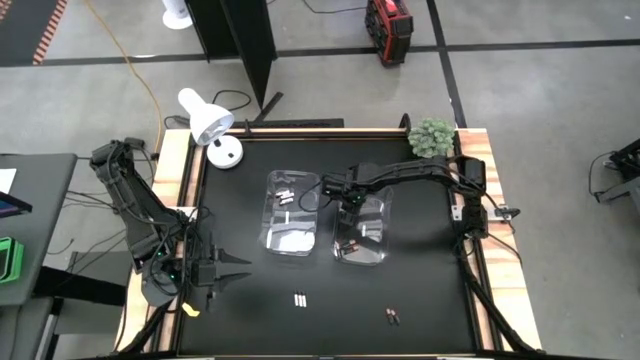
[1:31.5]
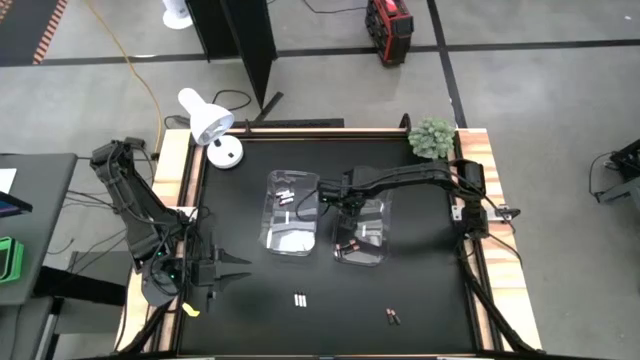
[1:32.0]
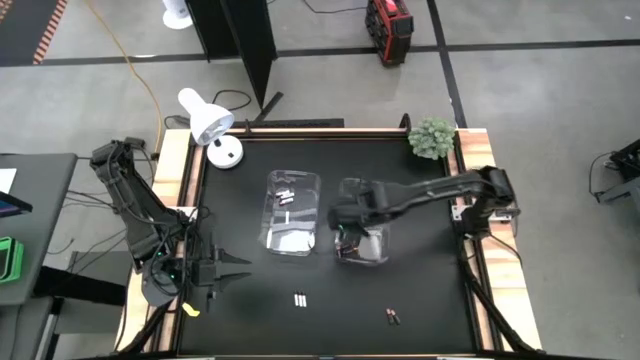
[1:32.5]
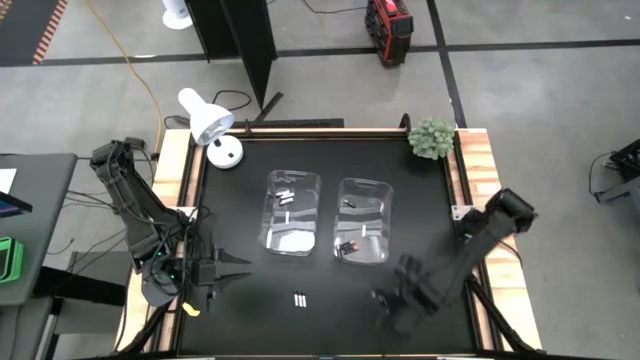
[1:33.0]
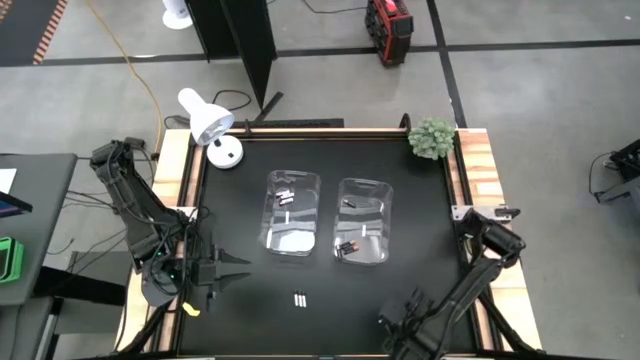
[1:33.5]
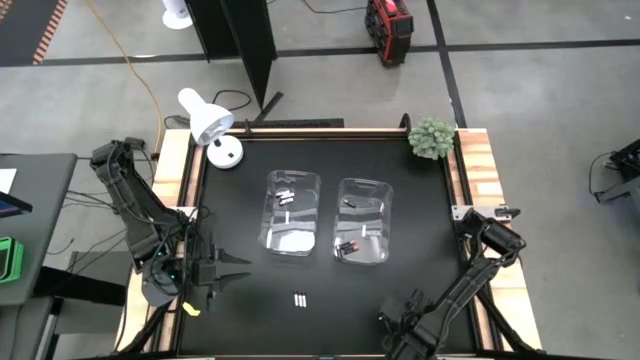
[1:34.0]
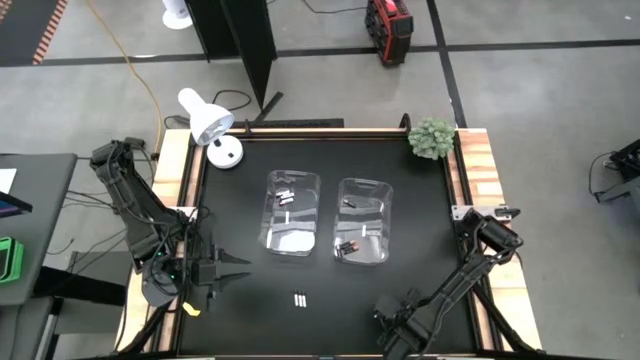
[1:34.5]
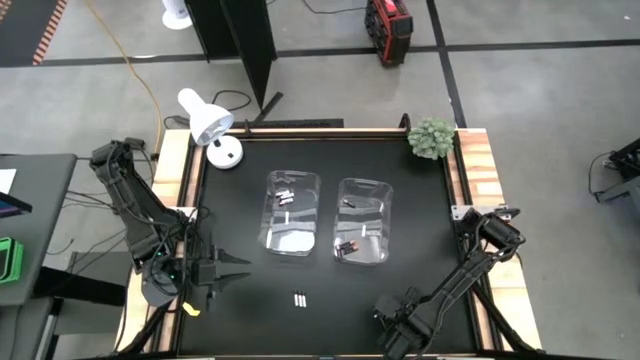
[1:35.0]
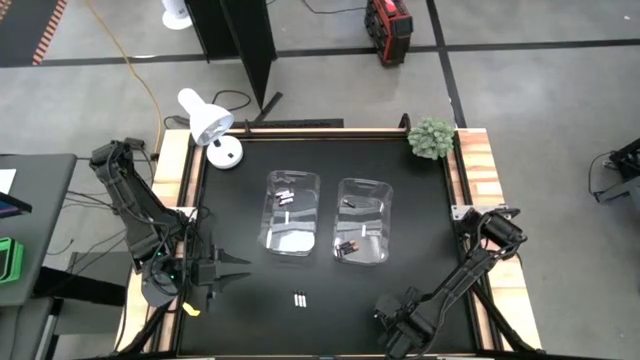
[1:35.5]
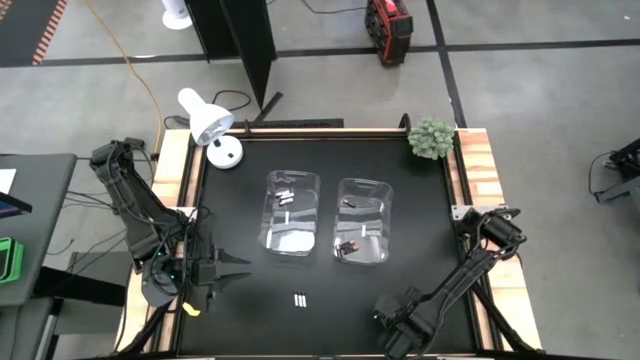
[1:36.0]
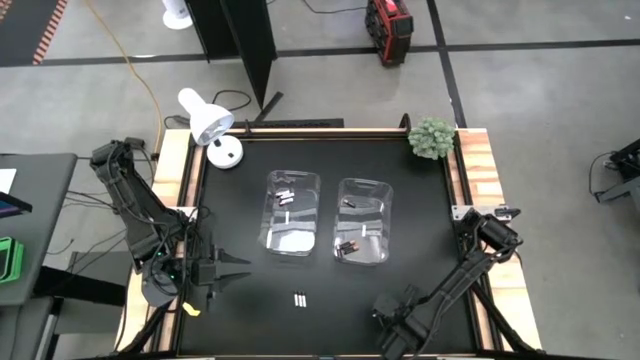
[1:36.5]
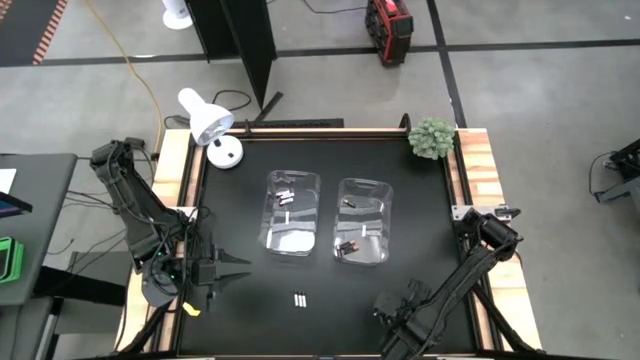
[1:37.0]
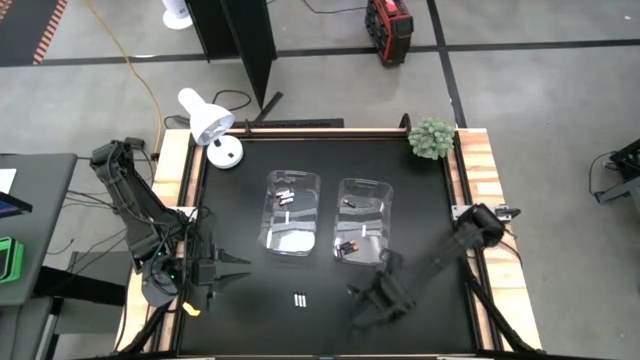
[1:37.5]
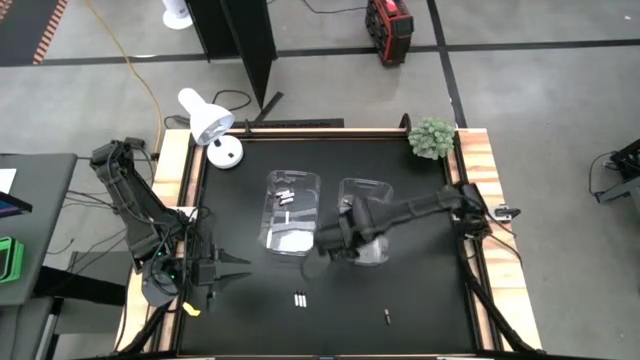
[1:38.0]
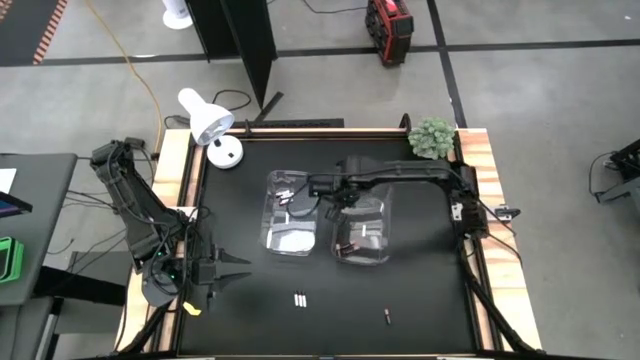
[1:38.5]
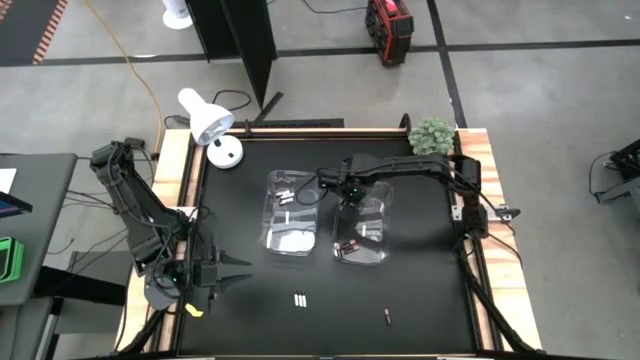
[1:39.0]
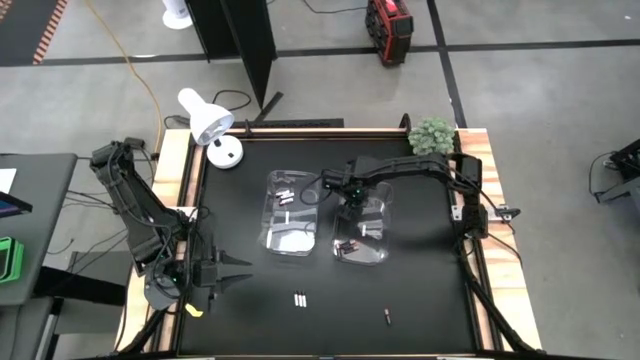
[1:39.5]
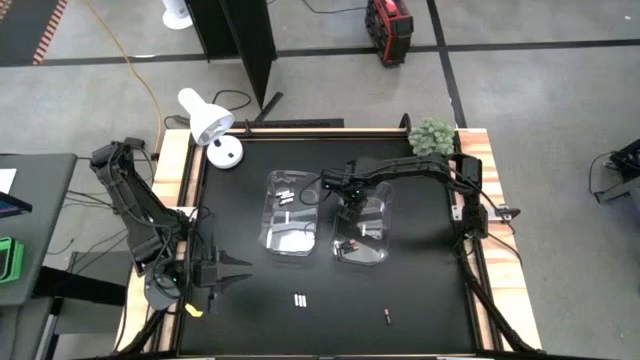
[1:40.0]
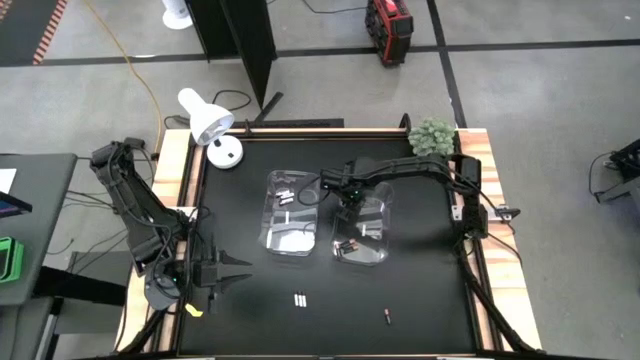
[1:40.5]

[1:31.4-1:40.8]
Task: Sort batteries
Put the black battery into the right transparent bin

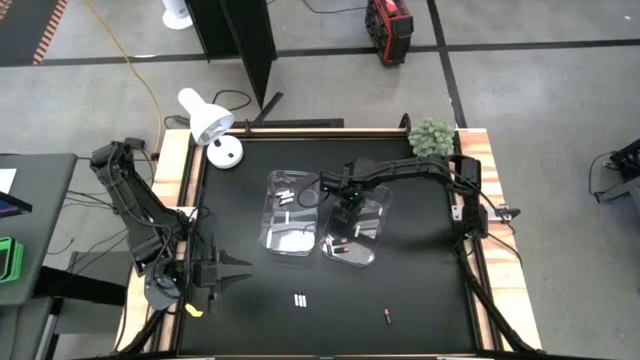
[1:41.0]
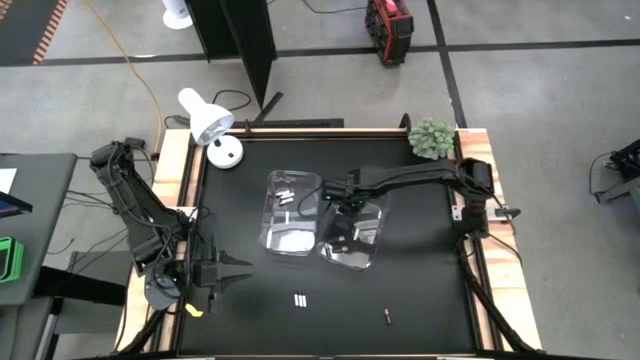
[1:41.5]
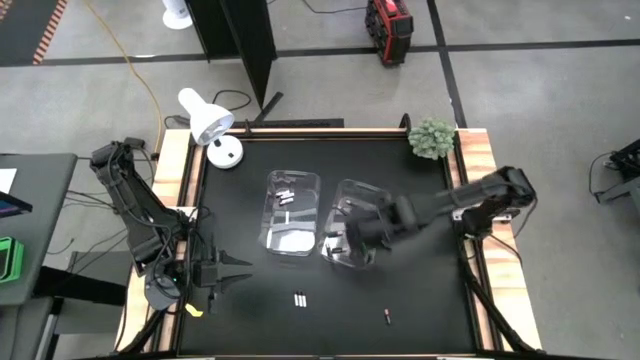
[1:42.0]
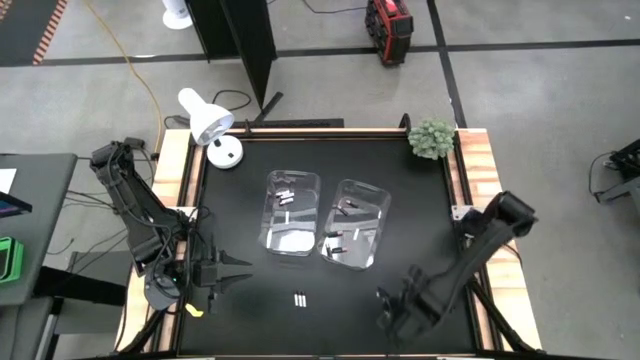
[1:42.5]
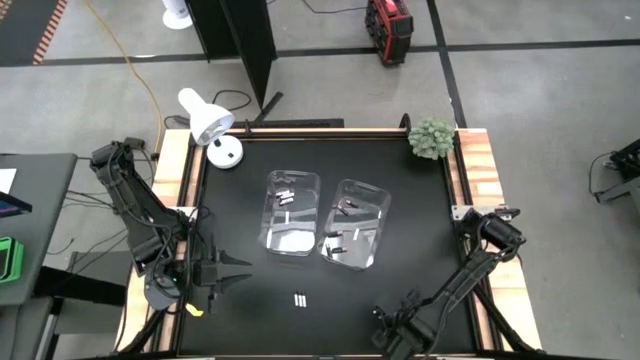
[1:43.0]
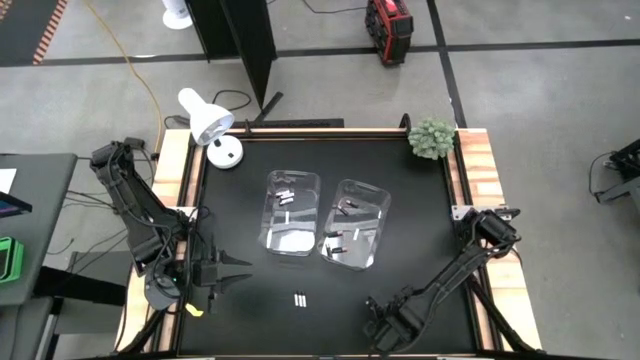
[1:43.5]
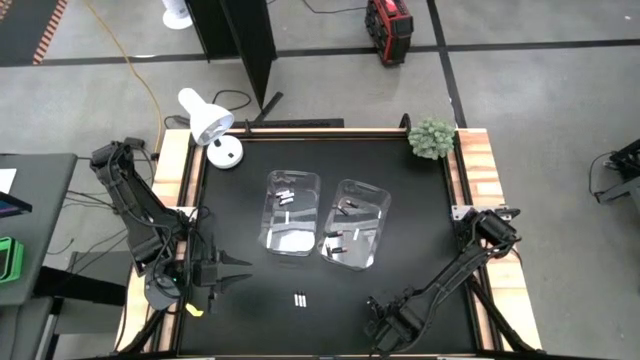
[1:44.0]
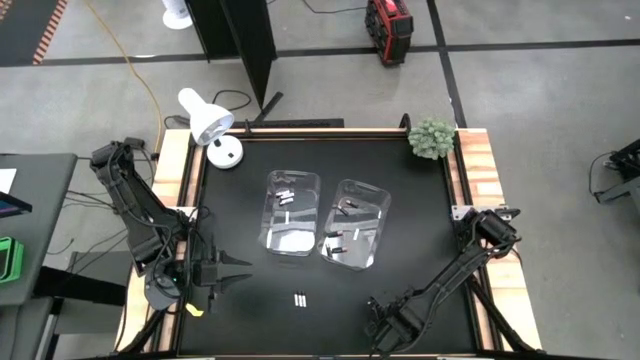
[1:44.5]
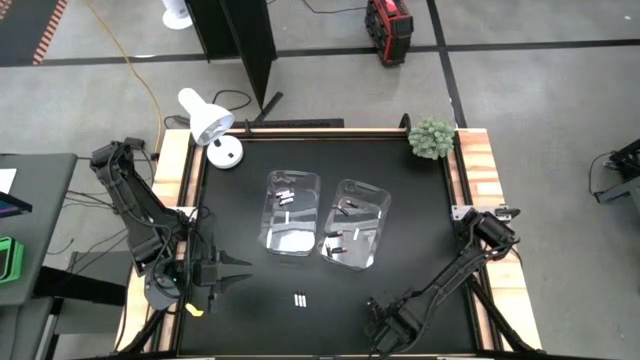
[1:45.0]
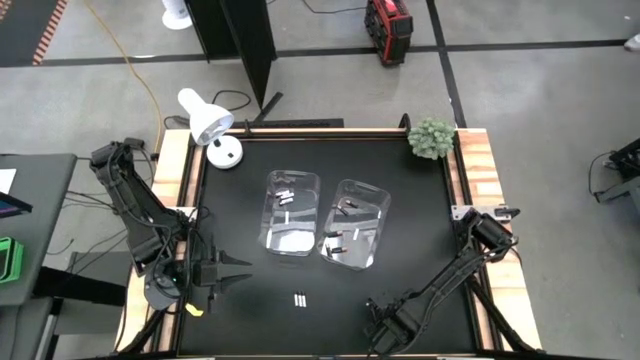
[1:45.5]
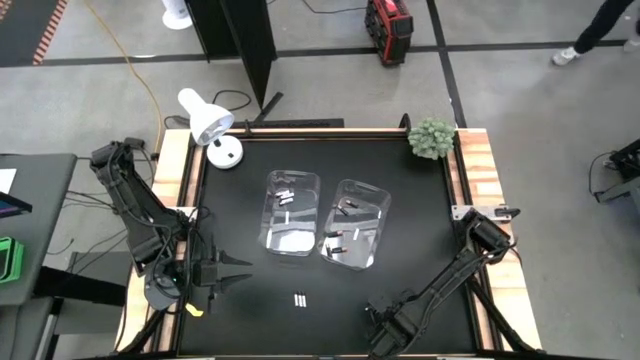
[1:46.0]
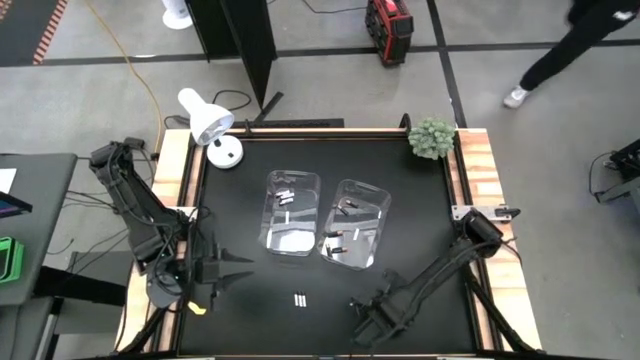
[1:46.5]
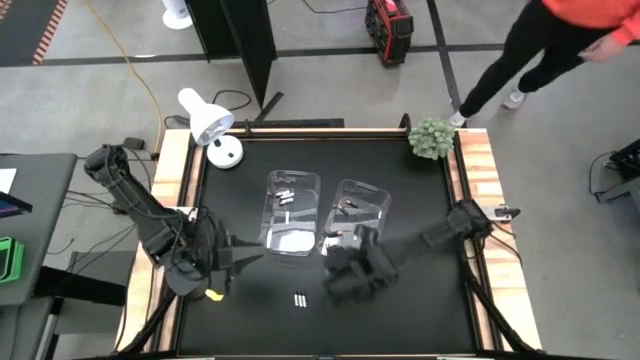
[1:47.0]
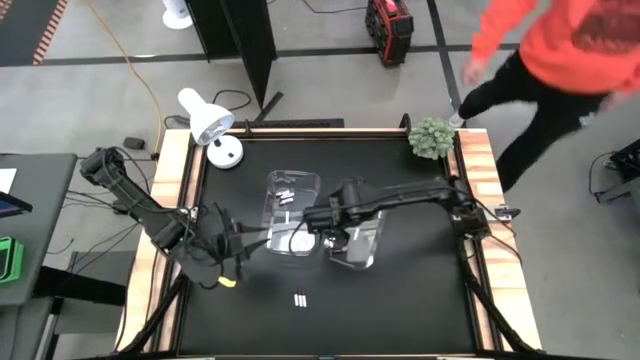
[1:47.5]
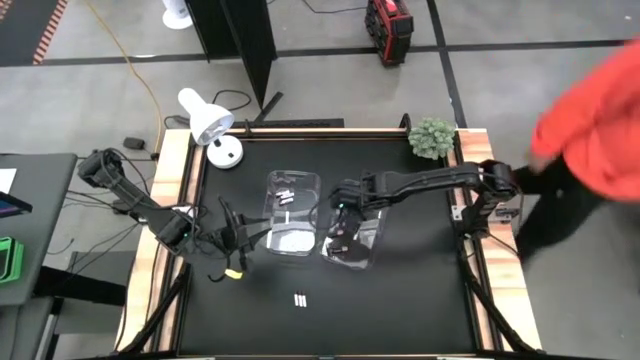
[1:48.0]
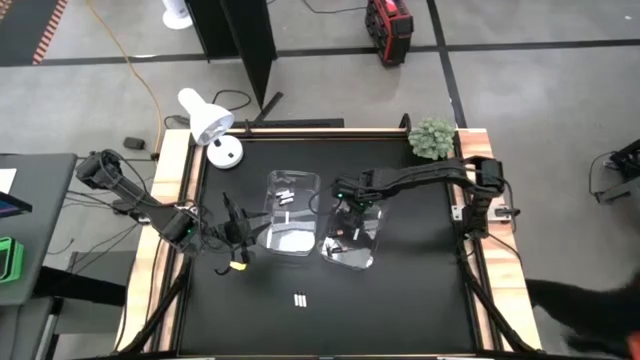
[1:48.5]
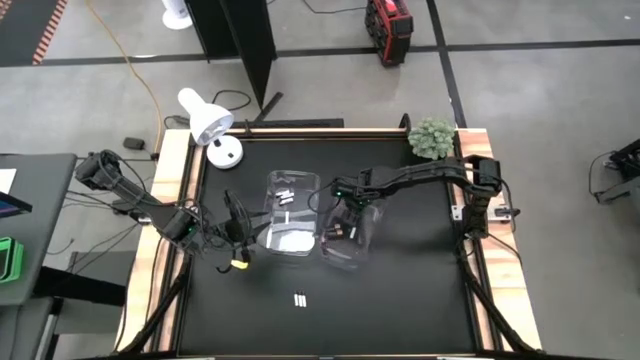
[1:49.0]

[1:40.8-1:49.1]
Put the black battery into the right transparent bin

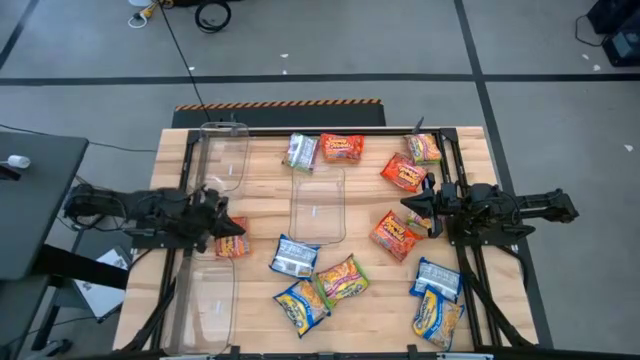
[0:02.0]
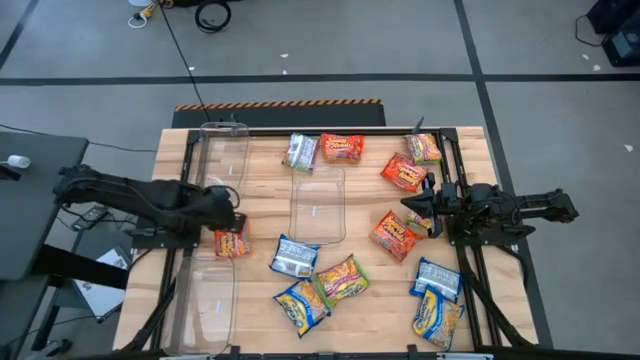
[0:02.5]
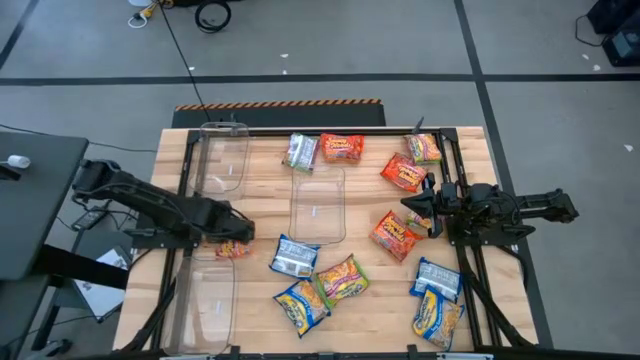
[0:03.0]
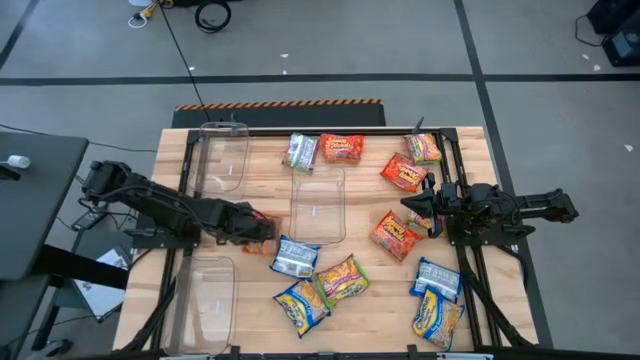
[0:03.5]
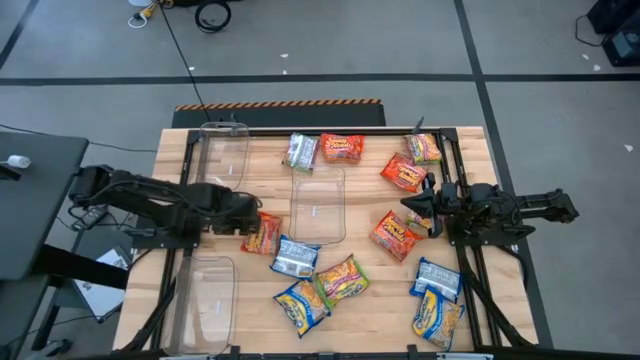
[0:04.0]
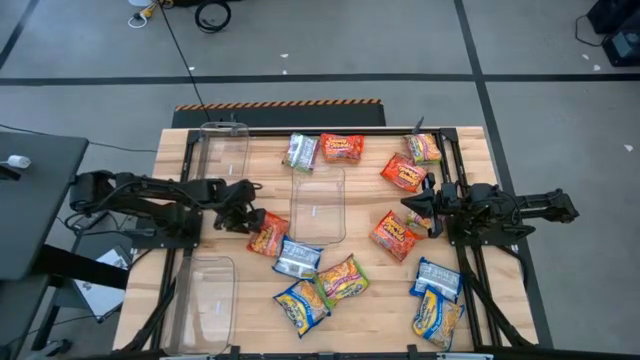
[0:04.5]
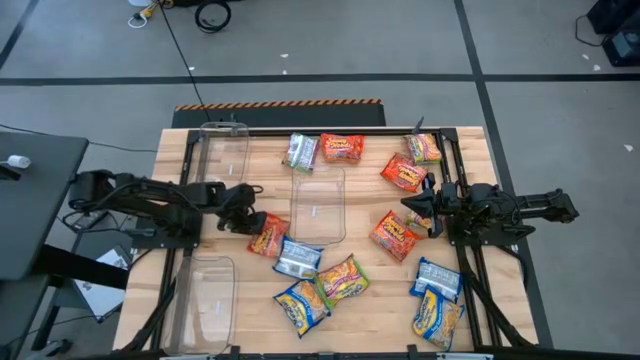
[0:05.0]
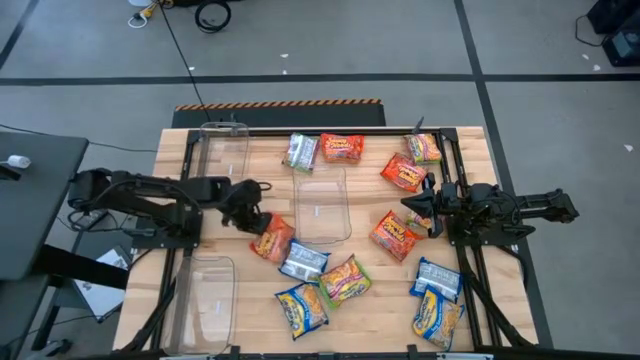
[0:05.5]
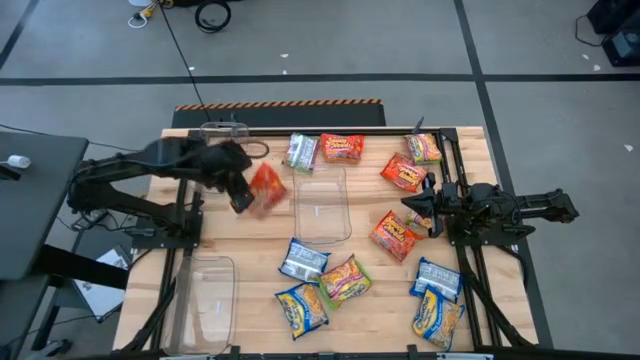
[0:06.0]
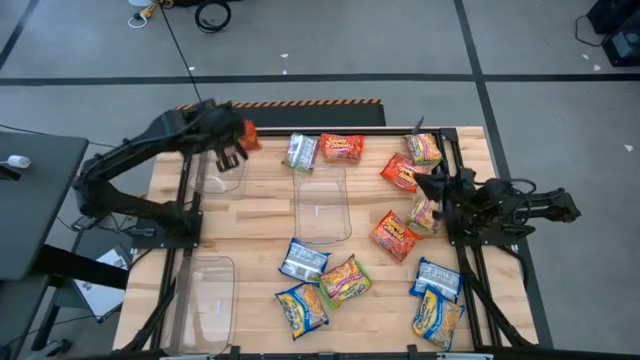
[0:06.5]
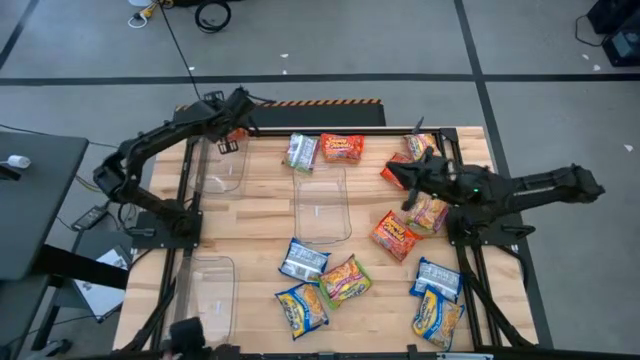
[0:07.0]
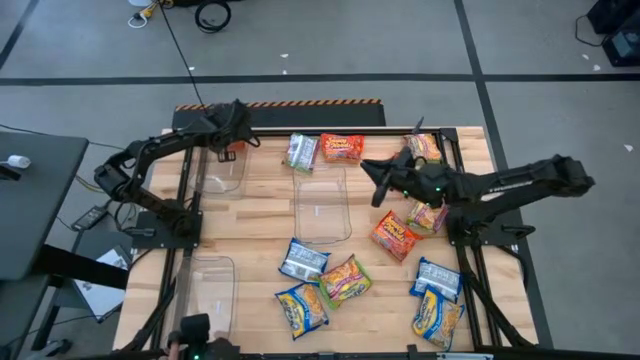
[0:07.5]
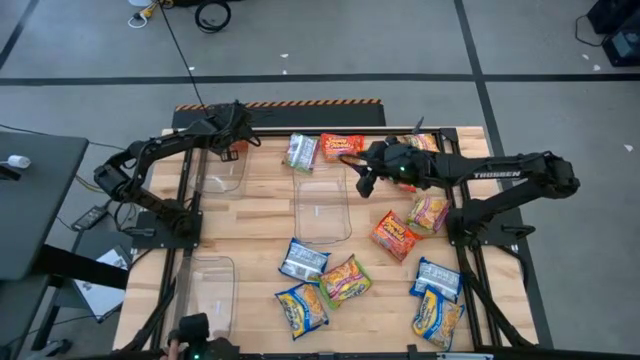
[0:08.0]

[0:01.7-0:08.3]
Task: Sort Maruchan noodles
Put the bottom left orange noodle pack into the top transparent bin
